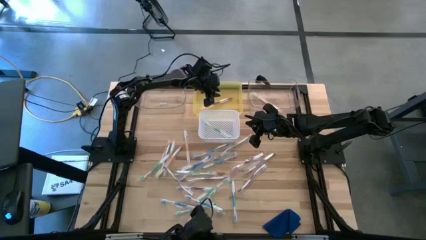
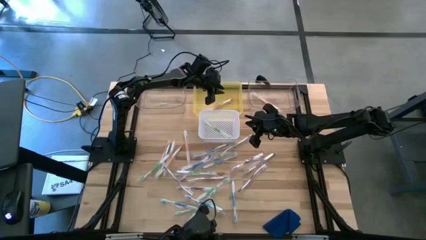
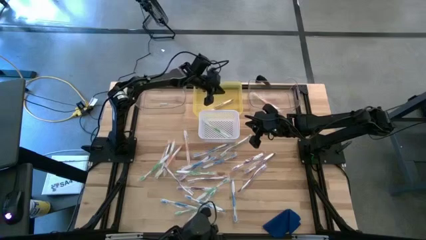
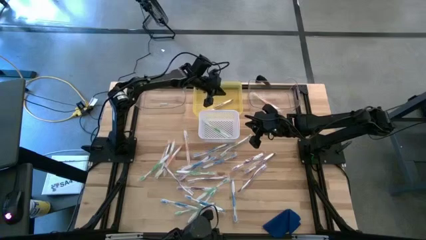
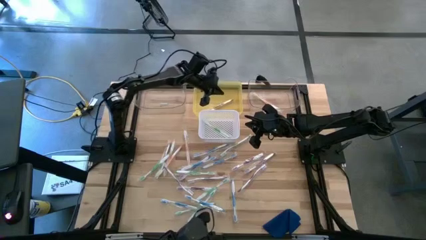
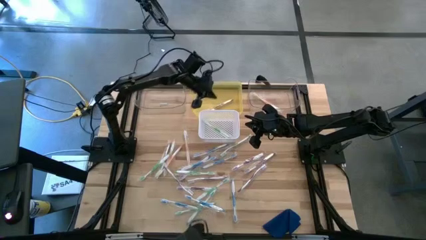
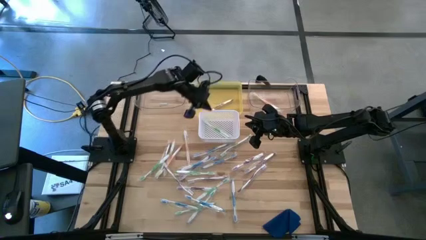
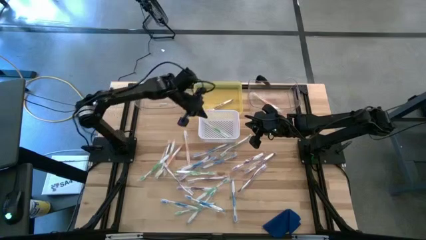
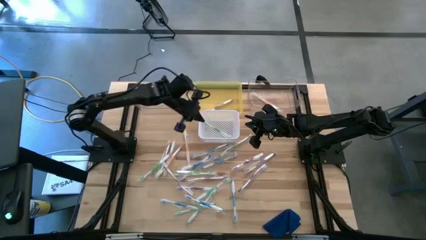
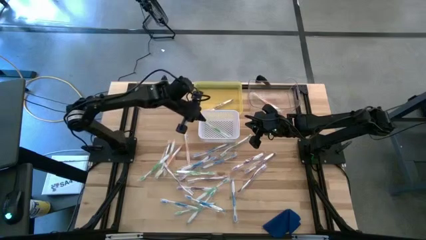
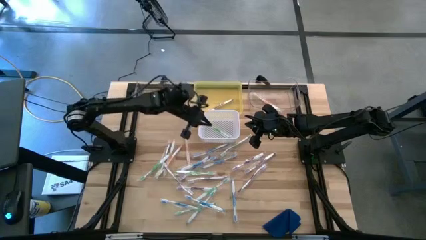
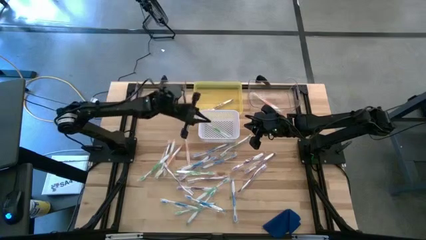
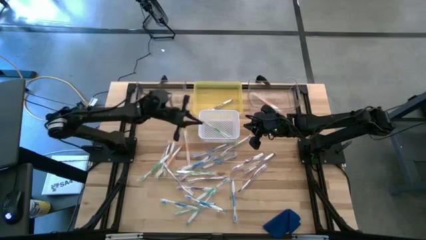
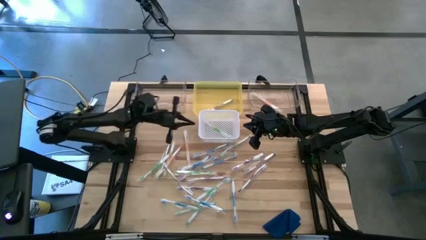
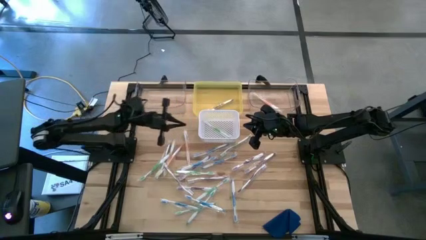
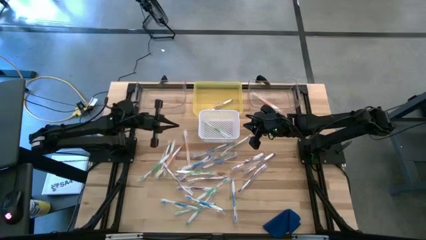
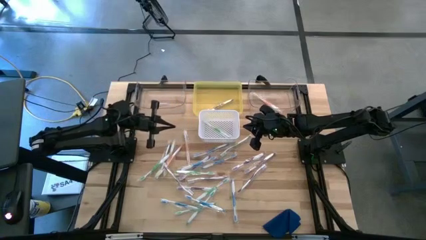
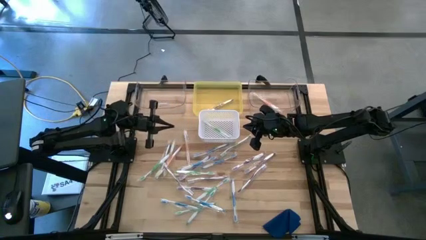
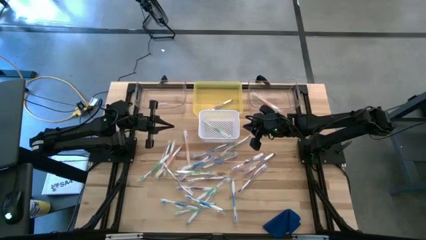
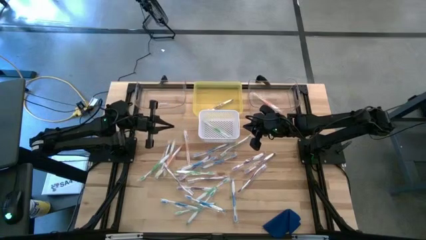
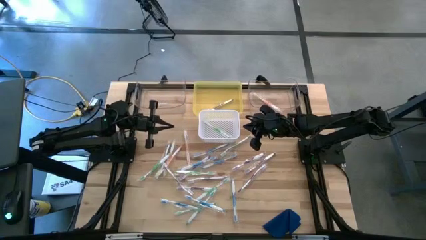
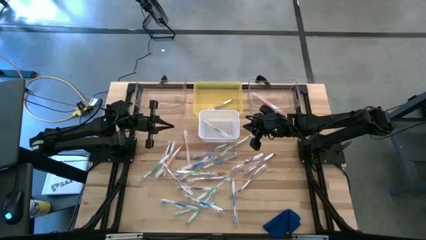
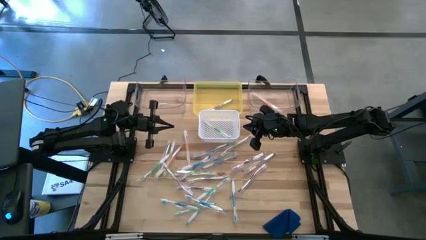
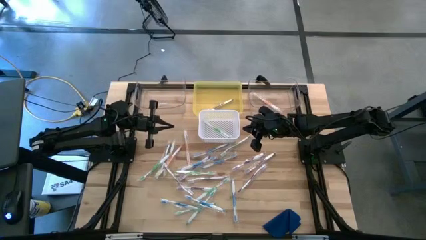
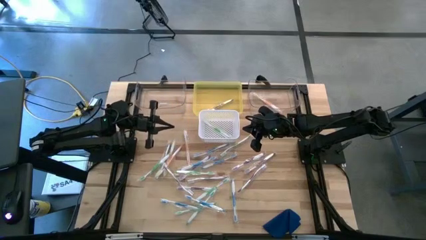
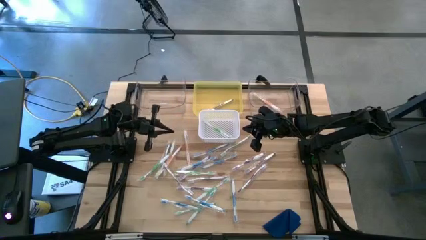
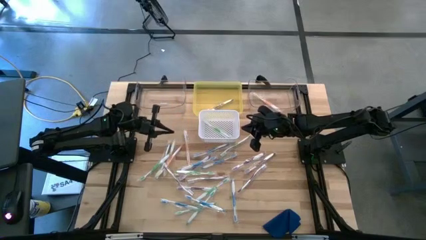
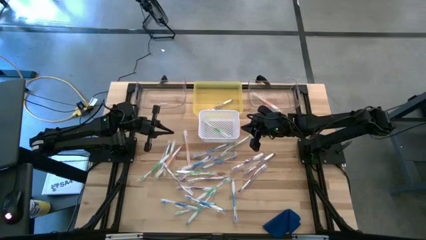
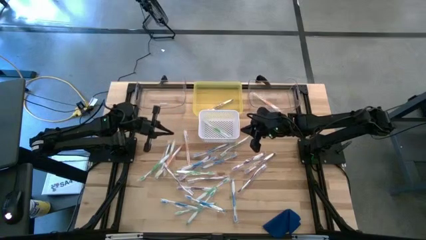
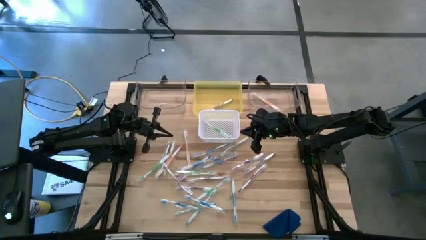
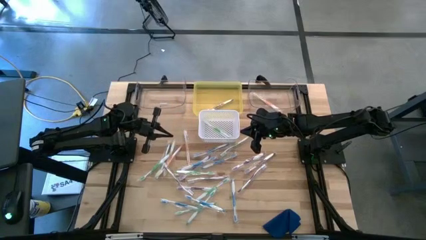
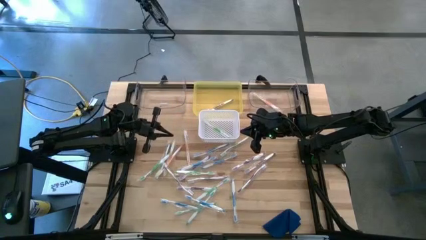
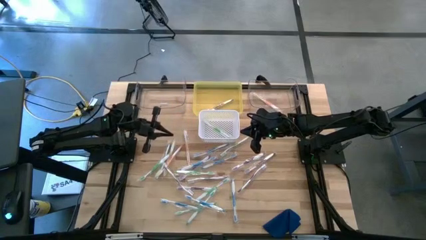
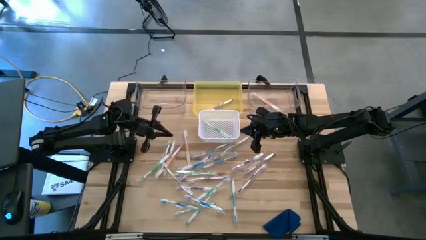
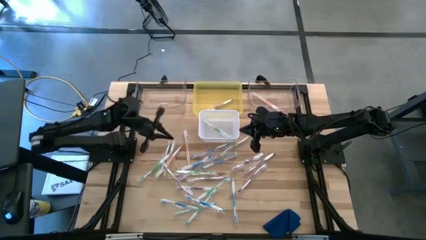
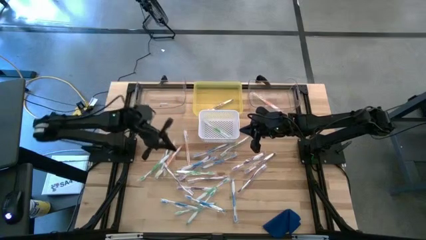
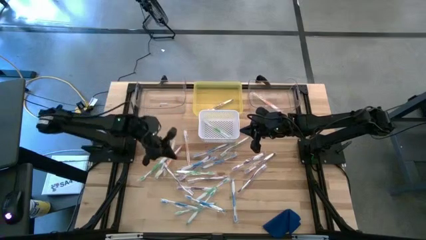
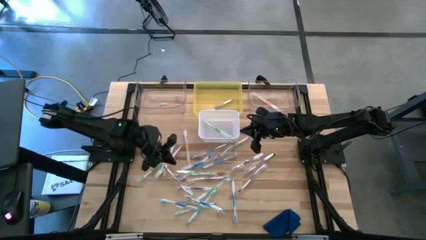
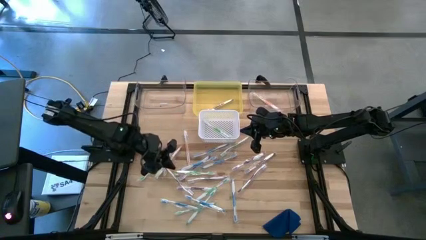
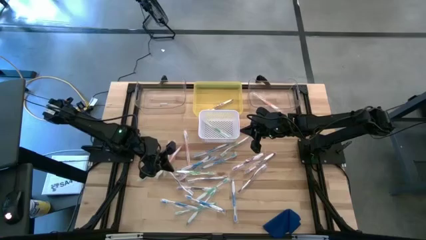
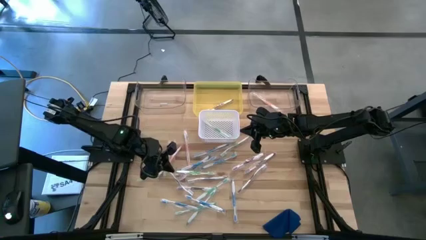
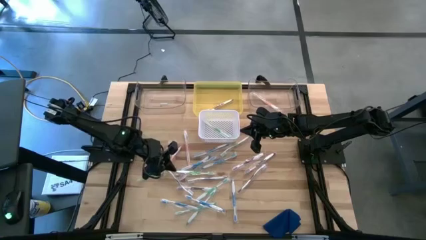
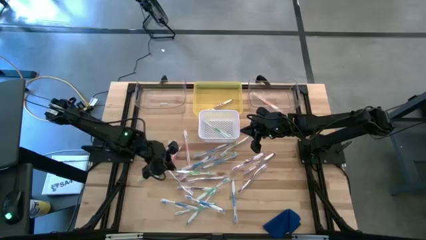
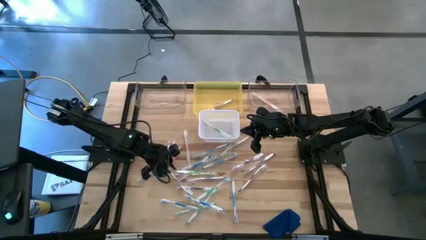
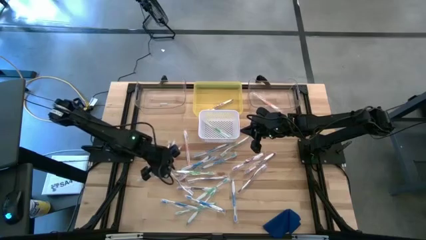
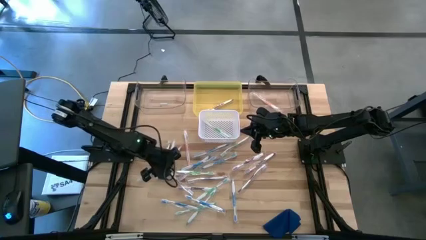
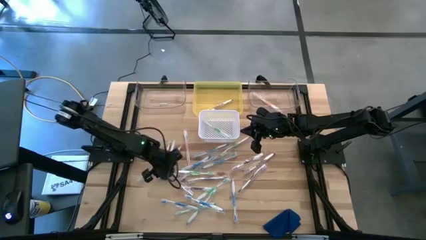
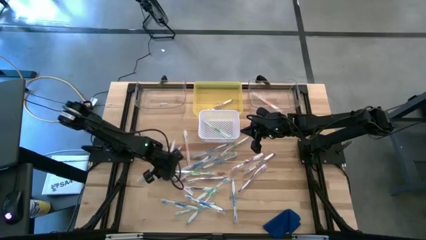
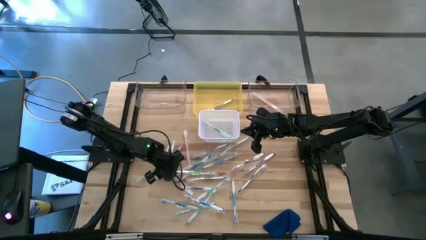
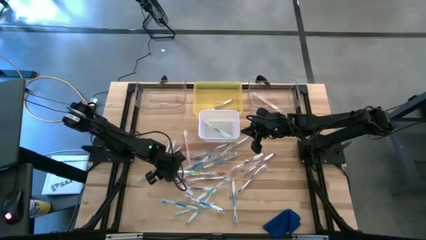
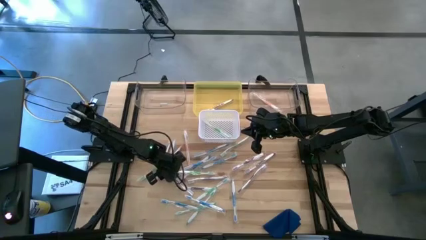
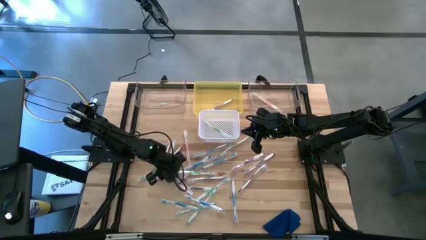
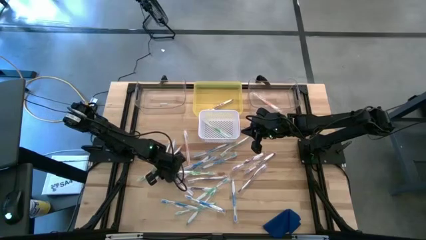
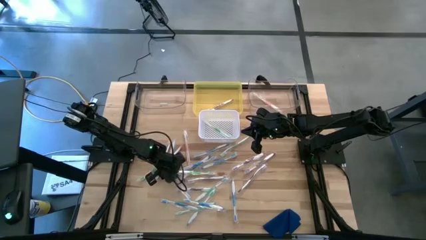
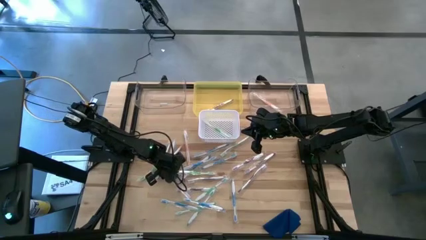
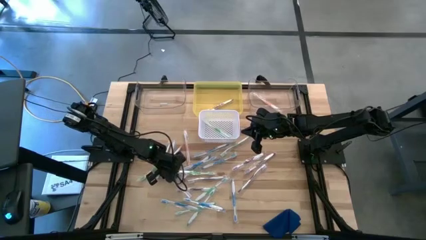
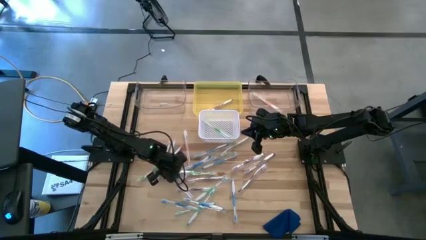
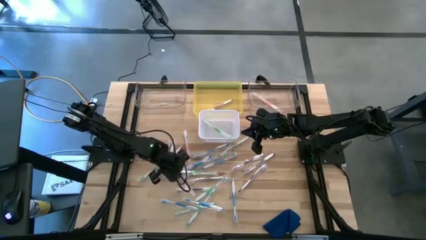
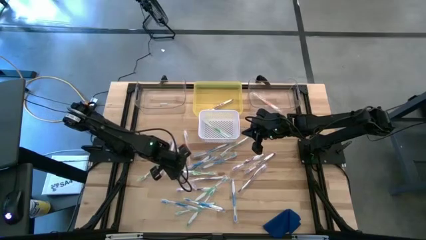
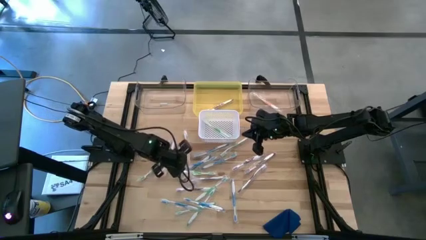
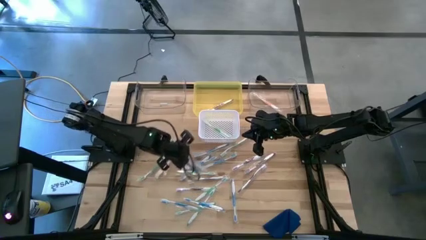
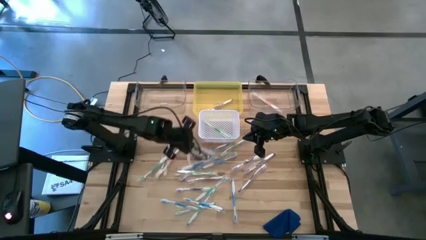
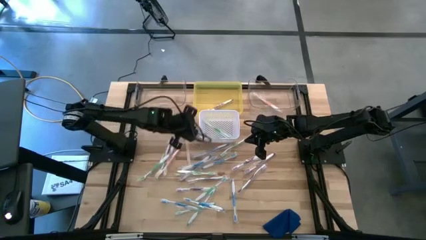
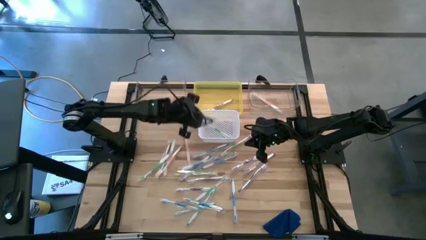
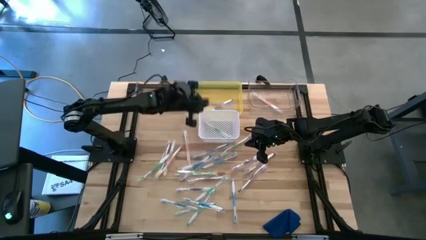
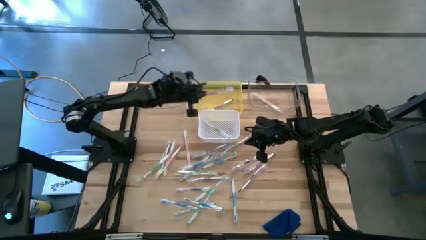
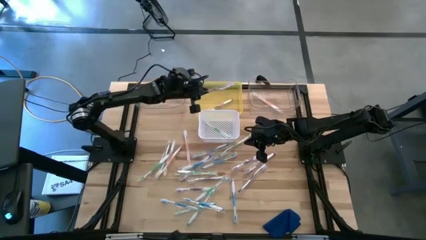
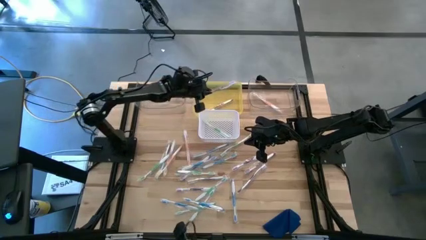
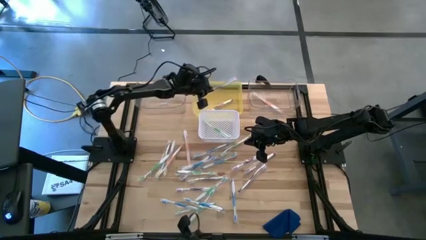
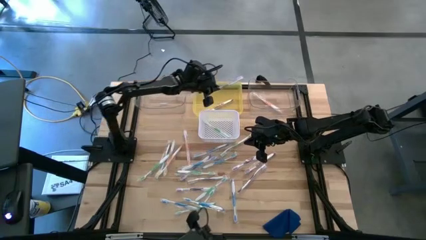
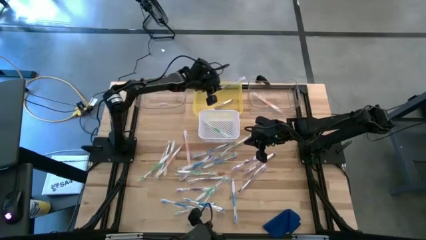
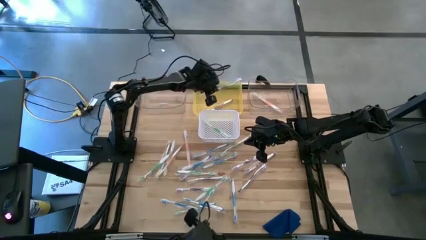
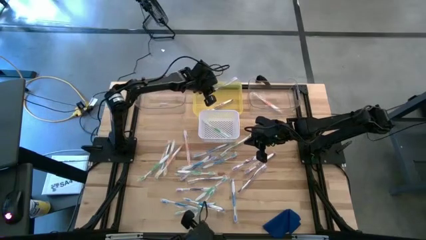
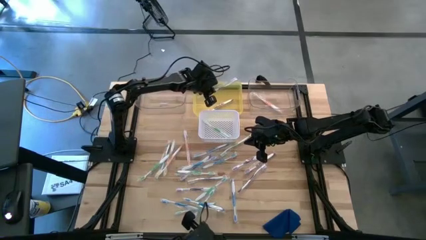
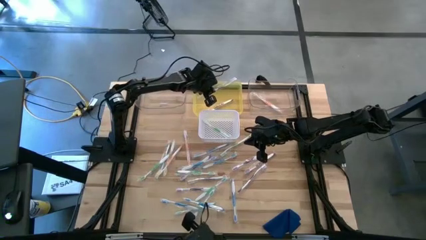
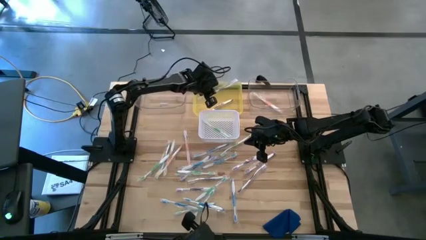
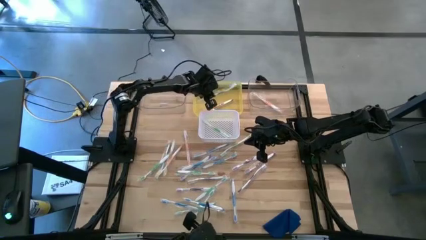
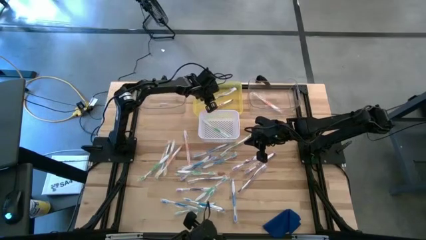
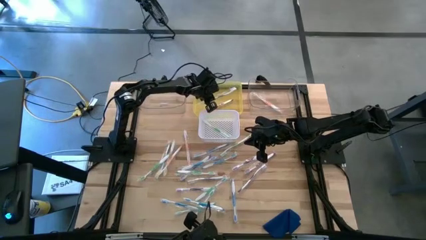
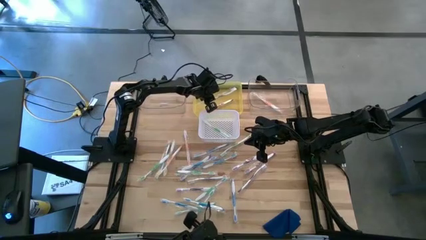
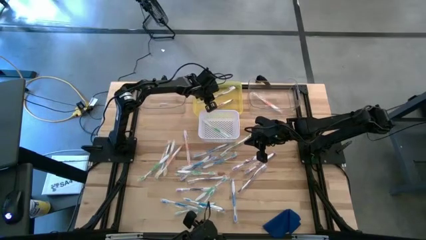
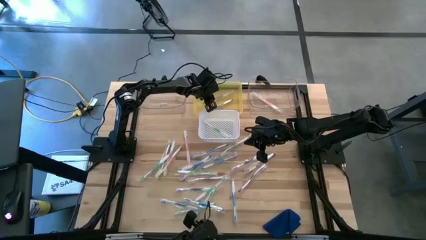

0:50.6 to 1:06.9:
Task: Pick & Place Toothbrushes
Put the purple toothbrush into the yellow bin
